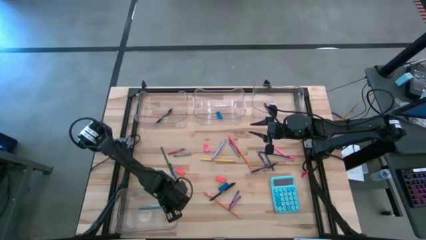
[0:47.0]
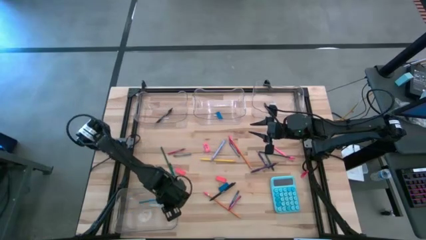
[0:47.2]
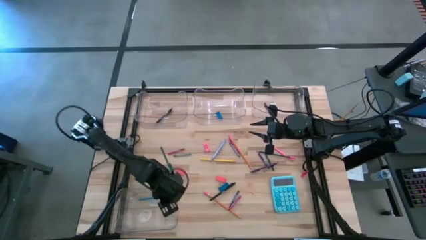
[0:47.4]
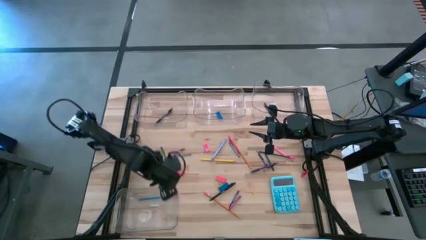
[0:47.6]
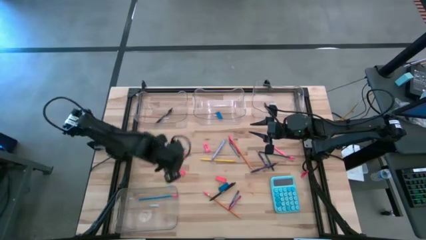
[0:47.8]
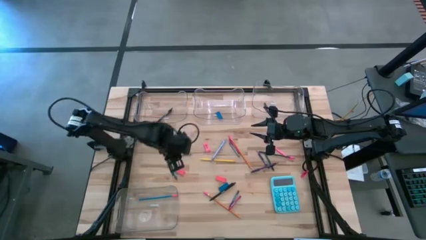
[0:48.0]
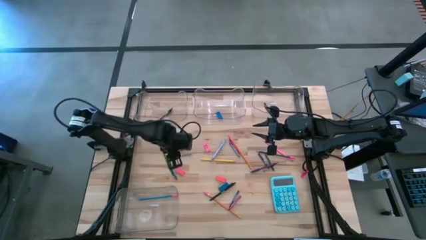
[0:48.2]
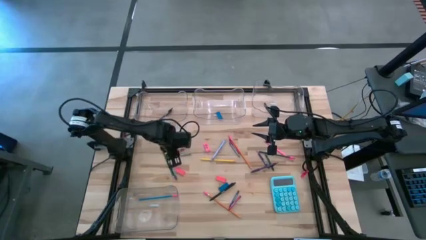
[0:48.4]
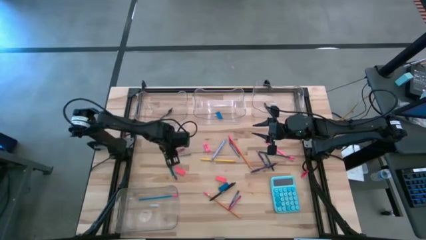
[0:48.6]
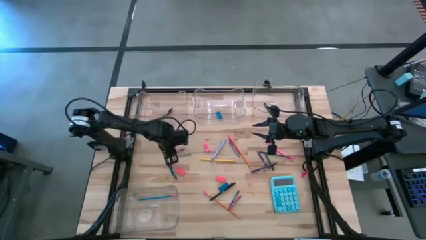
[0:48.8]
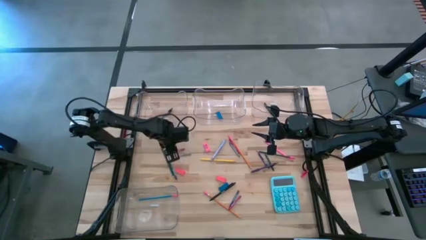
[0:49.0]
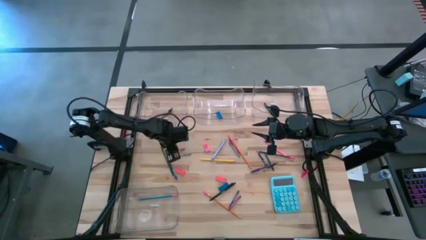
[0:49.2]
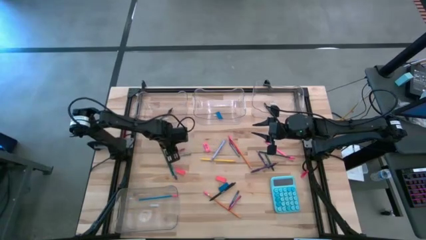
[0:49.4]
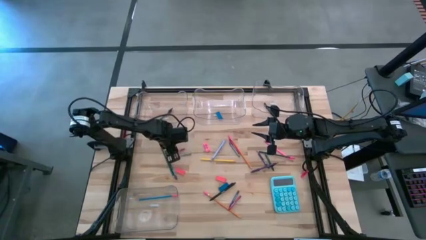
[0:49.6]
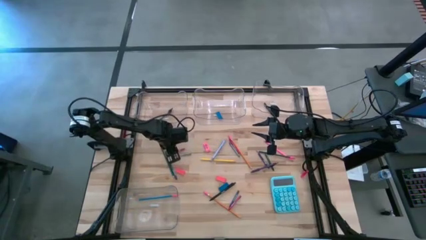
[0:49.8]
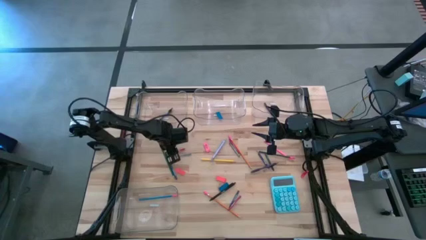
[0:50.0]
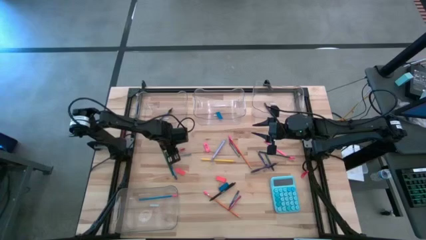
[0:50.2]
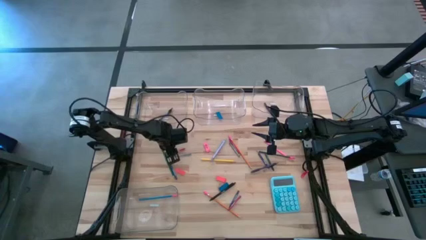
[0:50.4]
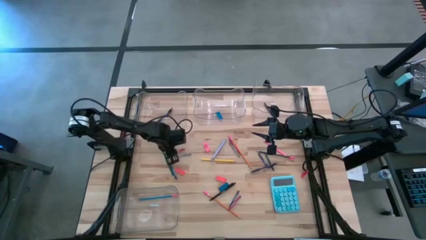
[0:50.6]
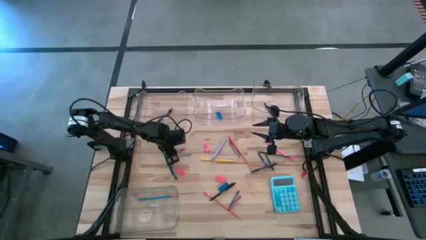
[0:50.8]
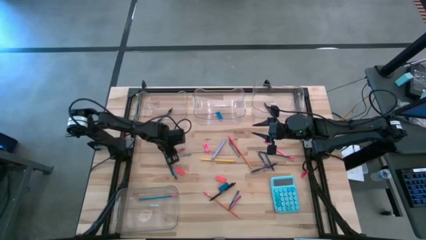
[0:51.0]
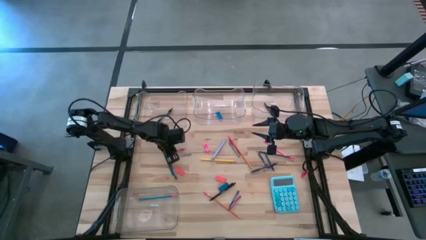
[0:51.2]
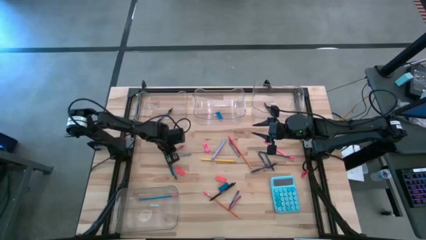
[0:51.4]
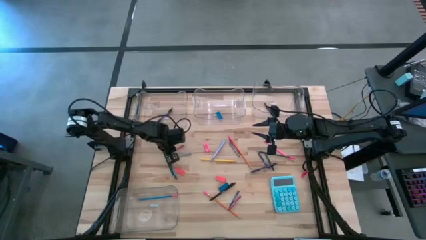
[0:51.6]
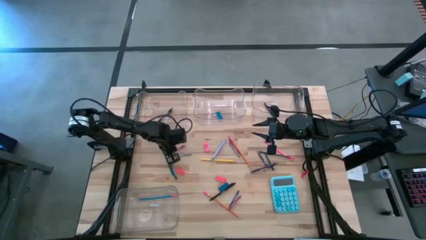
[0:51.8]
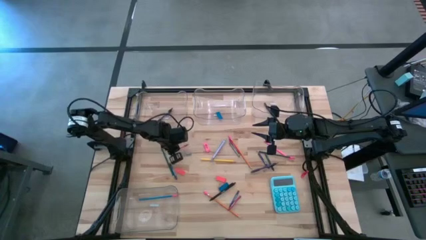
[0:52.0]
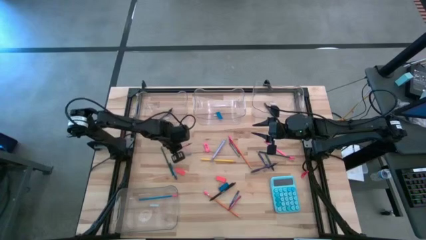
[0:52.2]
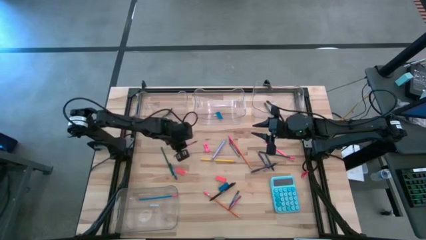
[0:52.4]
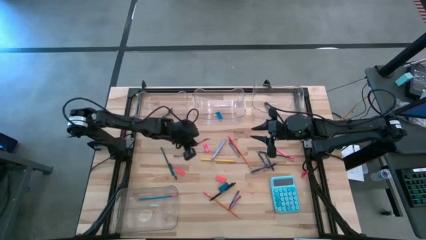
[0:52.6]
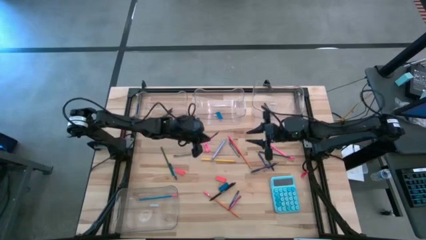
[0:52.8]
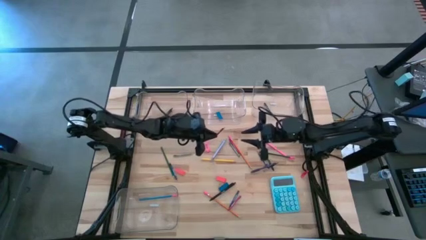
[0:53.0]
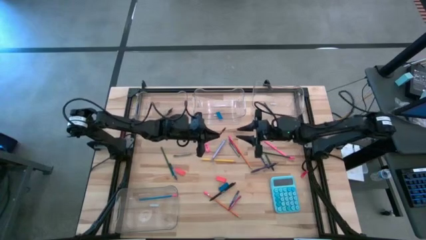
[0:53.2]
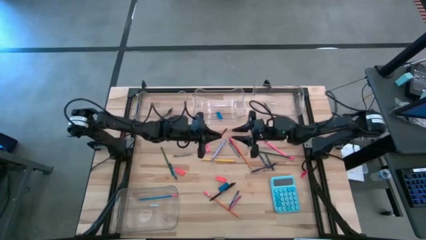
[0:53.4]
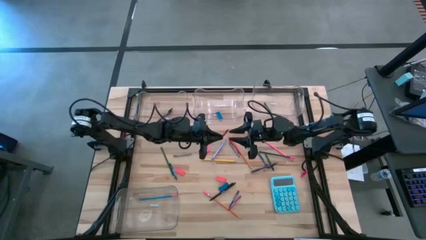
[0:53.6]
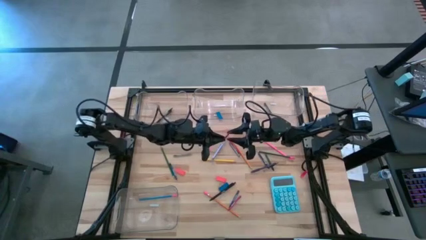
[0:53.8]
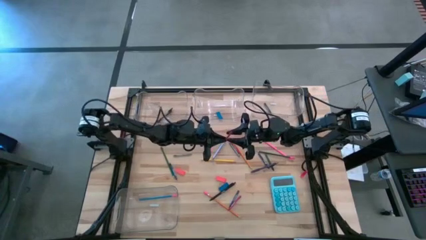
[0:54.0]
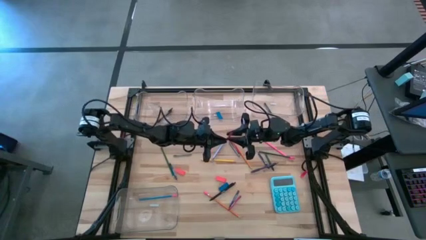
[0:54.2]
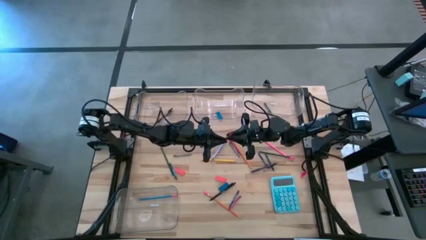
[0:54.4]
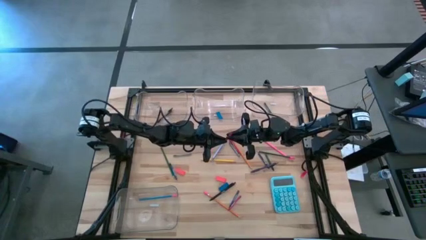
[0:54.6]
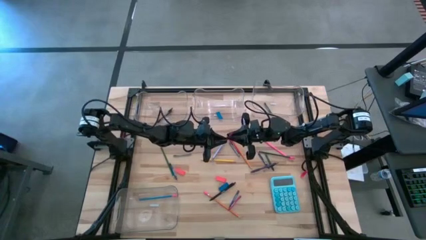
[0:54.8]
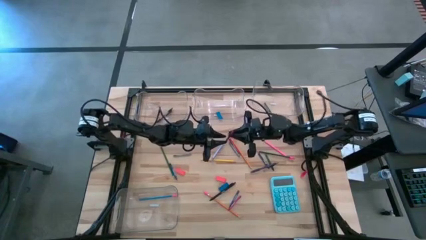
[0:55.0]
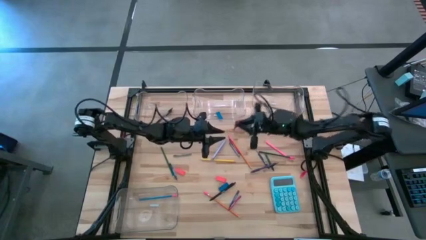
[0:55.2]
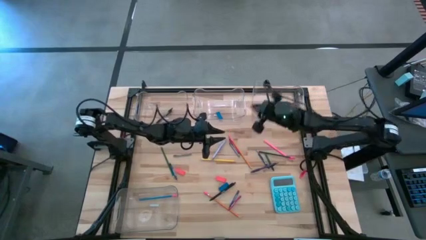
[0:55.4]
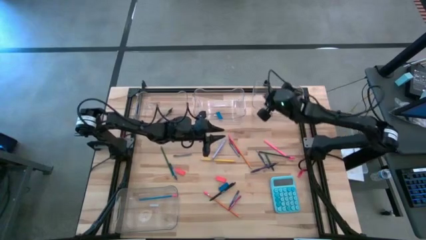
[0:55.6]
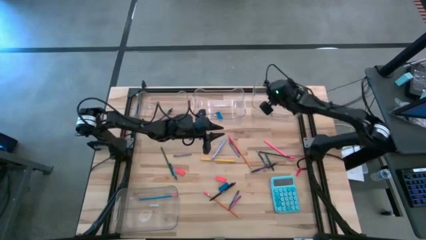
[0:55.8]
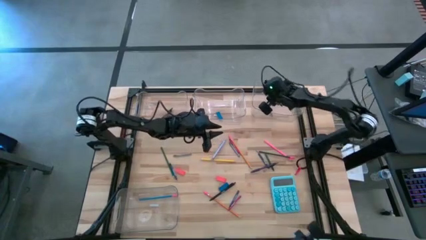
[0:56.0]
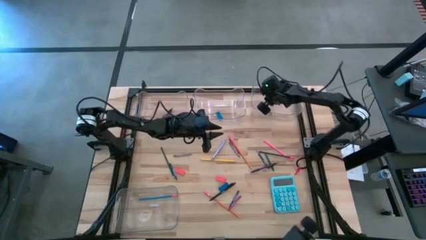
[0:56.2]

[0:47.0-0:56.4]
Task: Sort crayons/erasers/pens/pencils in bins
Put the red crayon into the top right transparent bin

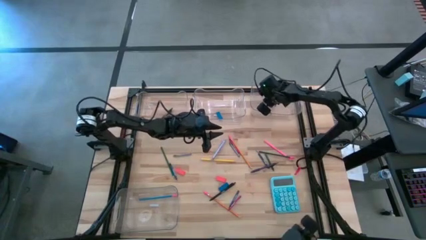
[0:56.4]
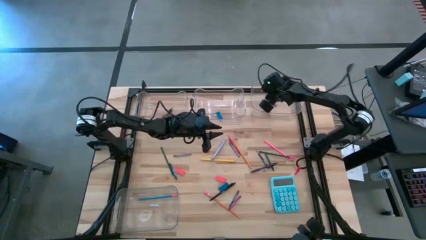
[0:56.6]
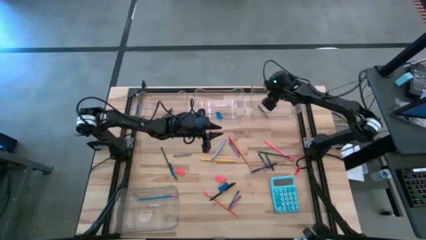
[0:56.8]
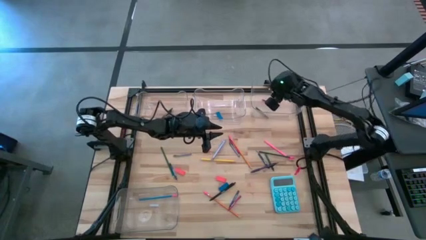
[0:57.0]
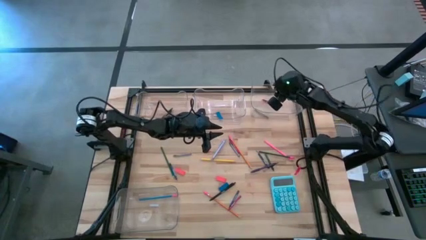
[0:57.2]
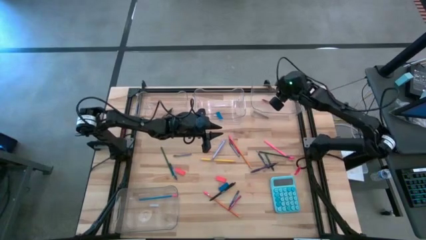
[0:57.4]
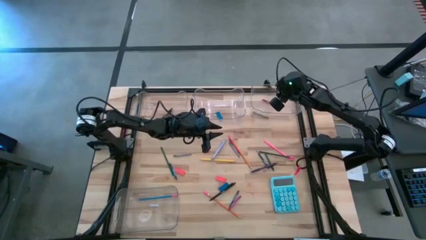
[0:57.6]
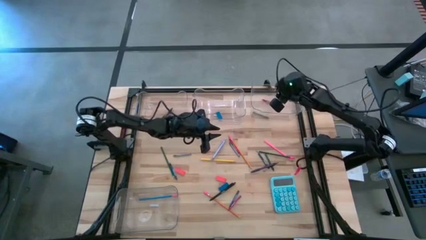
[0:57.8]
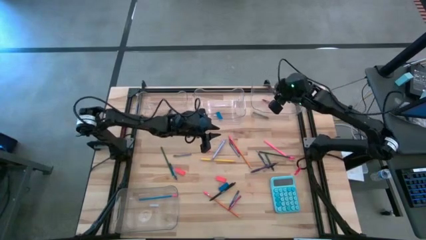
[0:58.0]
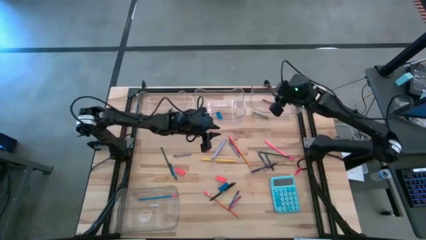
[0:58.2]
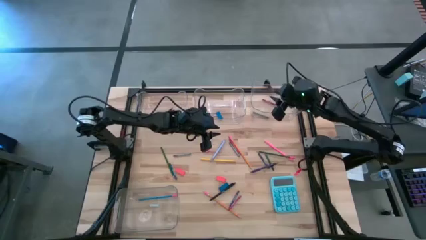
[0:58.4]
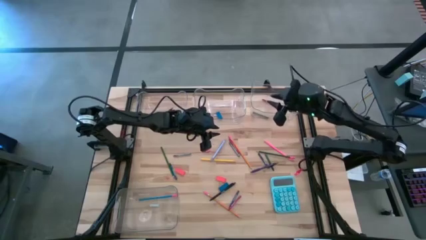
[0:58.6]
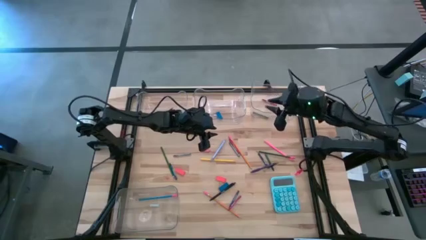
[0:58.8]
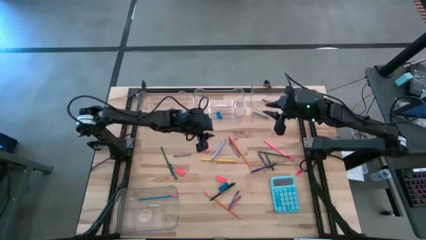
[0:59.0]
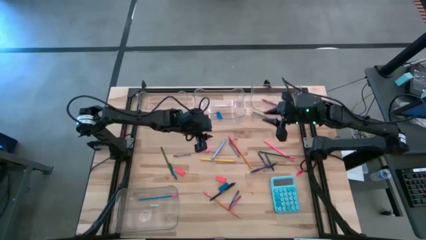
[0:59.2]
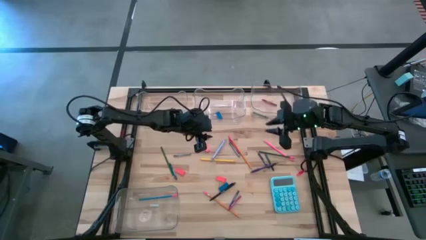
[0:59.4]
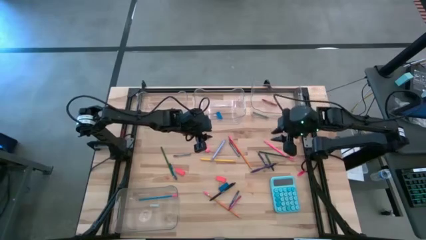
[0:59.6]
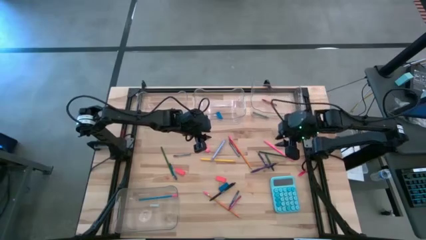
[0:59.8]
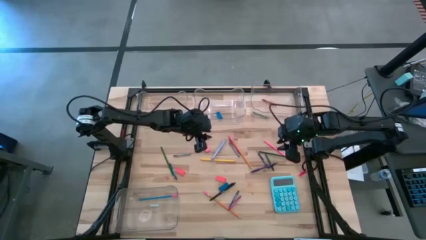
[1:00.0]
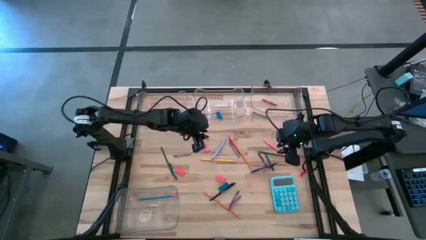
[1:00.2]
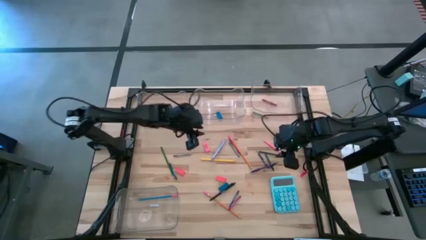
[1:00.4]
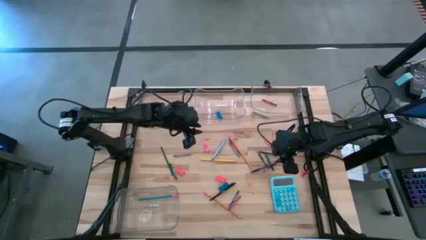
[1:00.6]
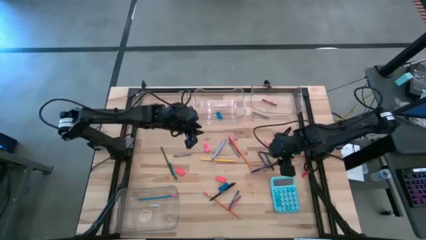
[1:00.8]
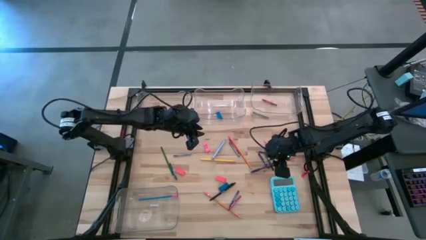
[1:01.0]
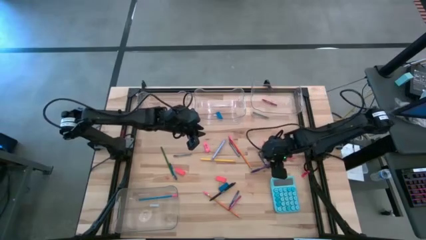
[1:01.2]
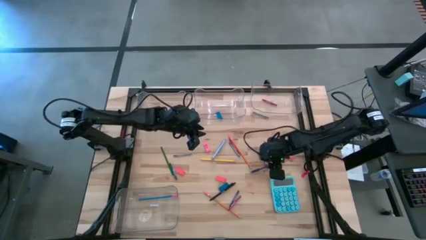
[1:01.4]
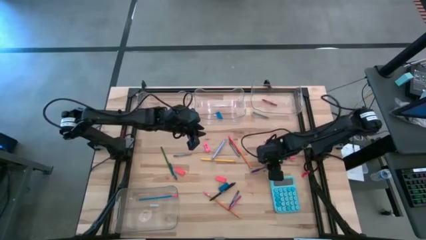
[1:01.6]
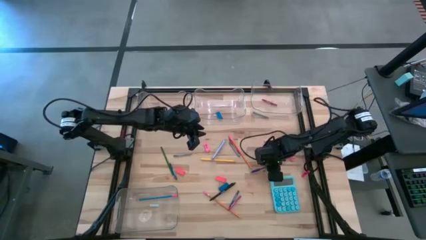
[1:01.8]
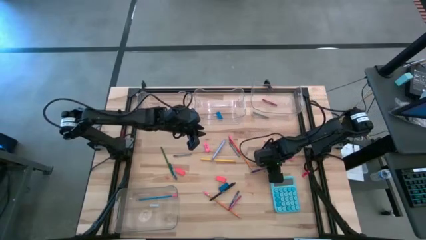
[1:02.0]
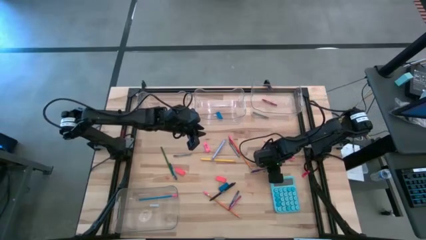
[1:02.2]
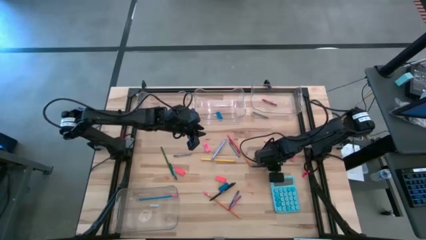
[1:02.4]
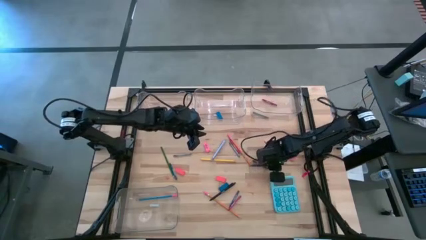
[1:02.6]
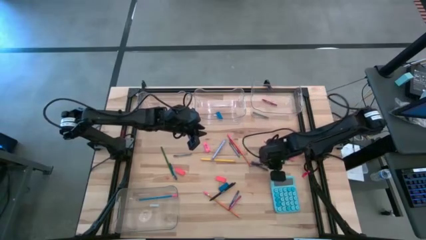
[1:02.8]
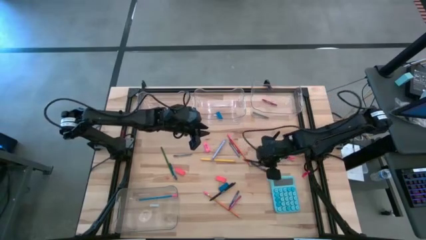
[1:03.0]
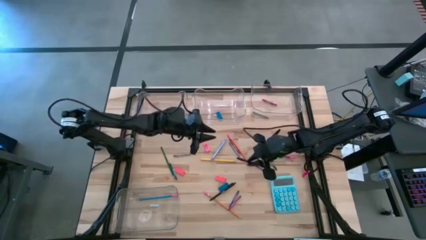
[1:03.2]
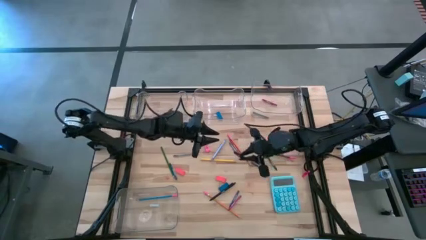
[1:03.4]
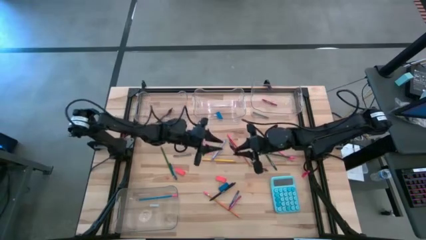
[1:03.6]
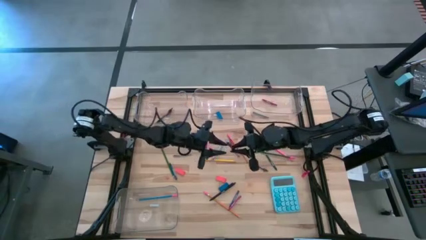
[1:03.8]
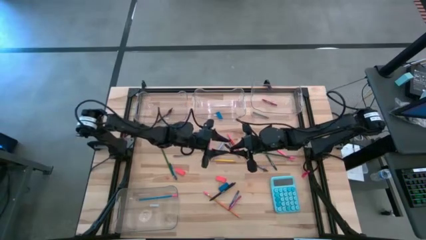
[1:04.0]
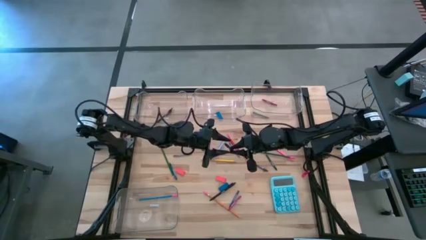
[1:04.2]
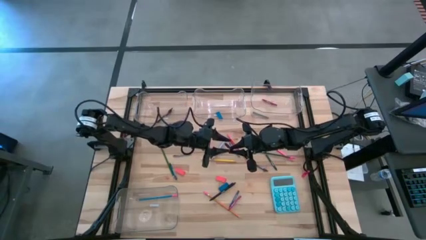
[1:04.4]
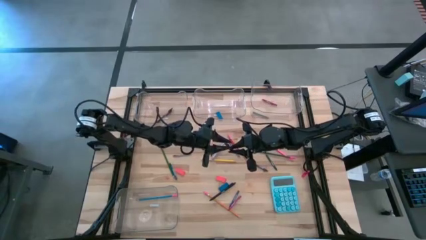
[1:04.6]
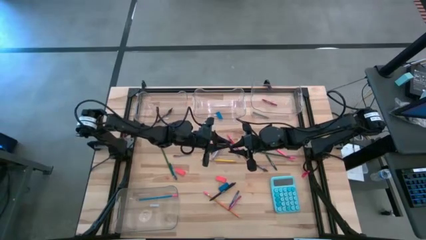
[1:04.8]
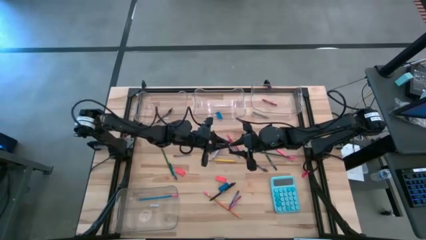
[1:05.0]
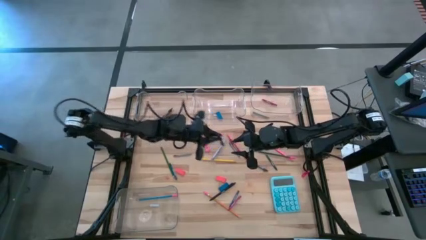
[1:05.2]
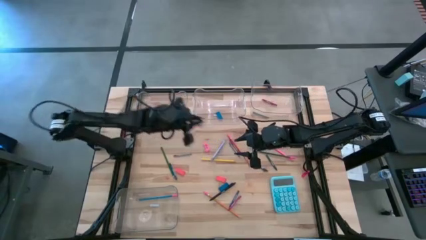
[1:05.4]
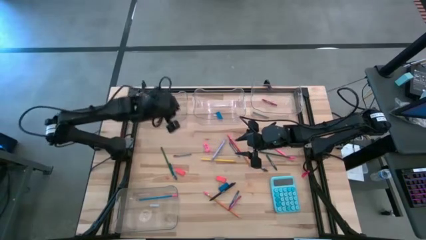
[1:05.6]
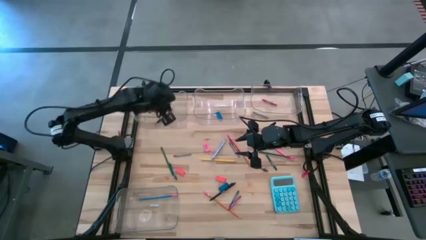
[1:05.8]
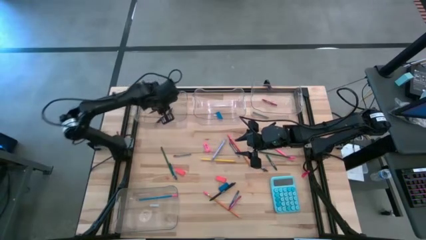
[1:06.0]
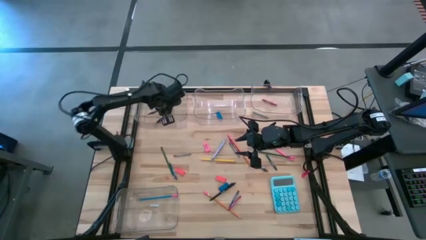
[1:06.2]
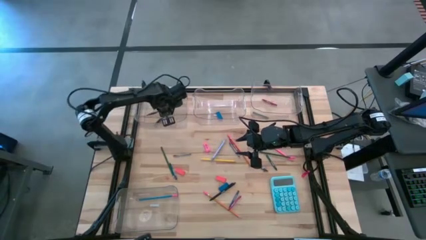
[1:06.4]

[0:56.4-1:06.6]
Put the purple ballpen into the top left transparent bin
